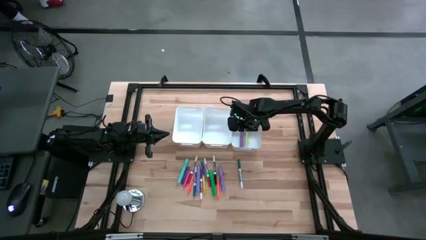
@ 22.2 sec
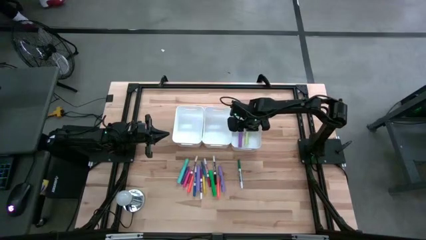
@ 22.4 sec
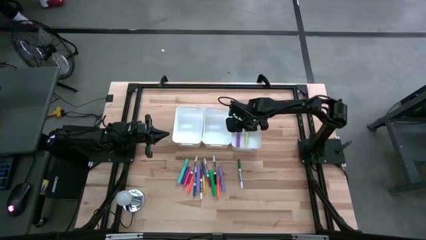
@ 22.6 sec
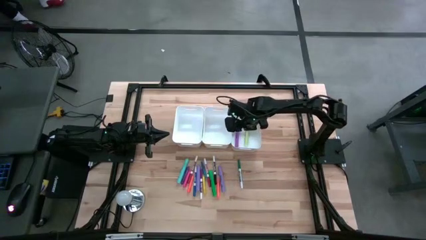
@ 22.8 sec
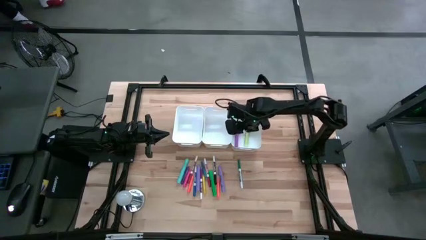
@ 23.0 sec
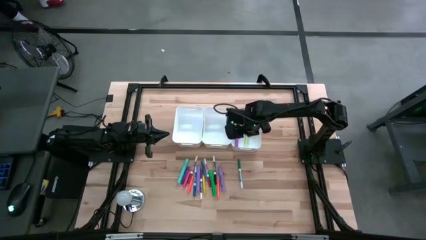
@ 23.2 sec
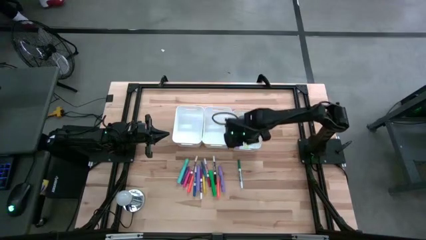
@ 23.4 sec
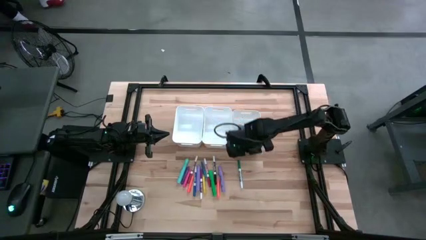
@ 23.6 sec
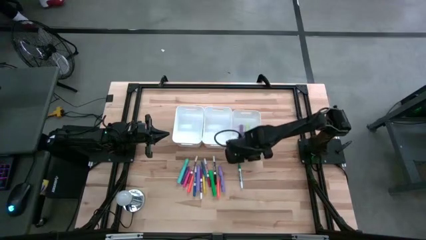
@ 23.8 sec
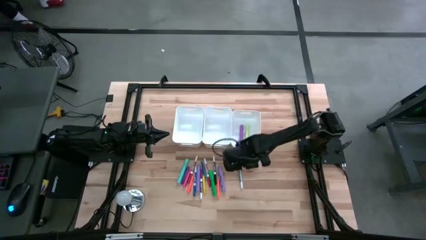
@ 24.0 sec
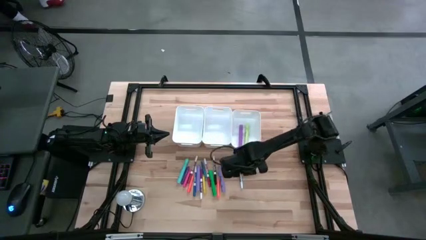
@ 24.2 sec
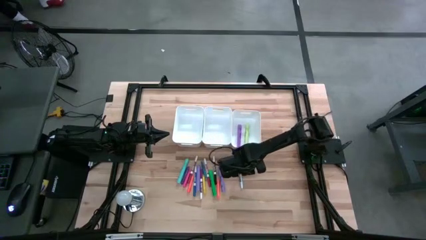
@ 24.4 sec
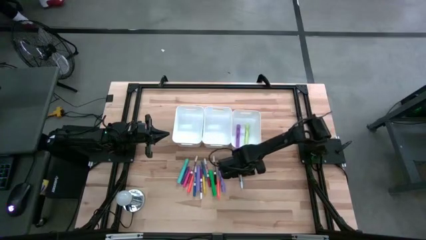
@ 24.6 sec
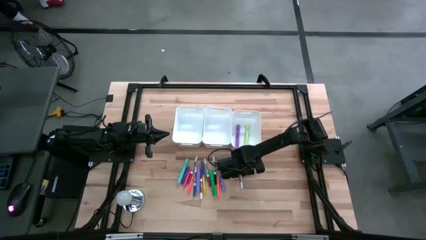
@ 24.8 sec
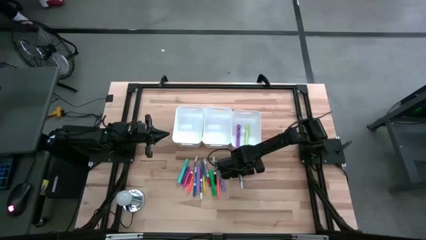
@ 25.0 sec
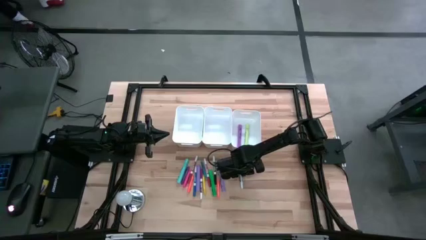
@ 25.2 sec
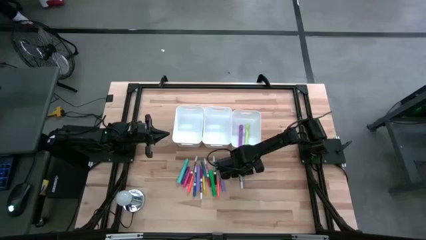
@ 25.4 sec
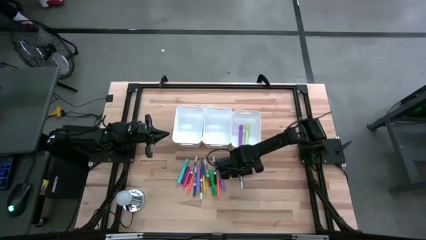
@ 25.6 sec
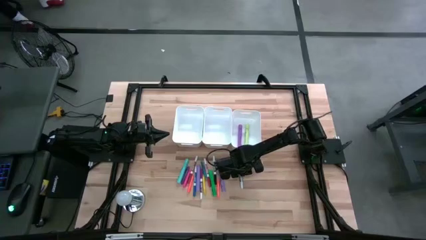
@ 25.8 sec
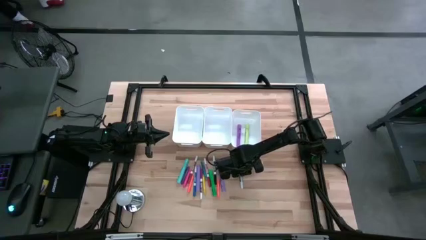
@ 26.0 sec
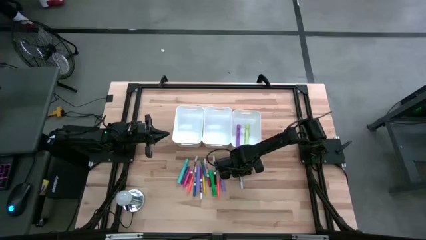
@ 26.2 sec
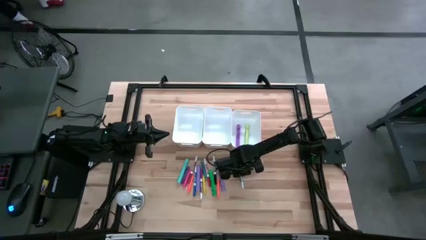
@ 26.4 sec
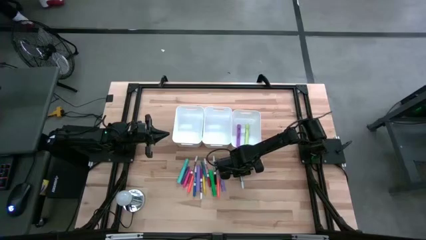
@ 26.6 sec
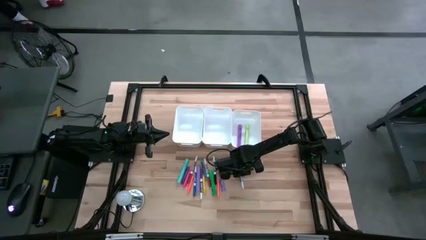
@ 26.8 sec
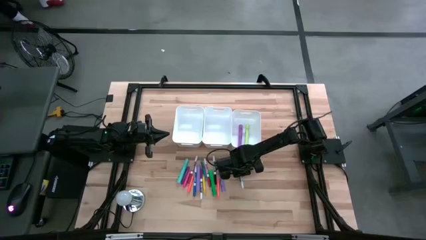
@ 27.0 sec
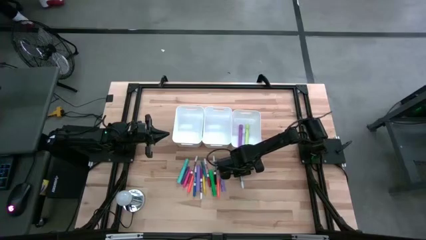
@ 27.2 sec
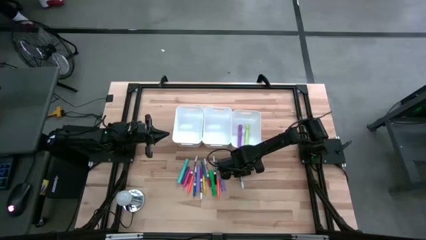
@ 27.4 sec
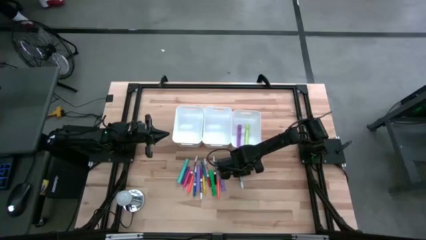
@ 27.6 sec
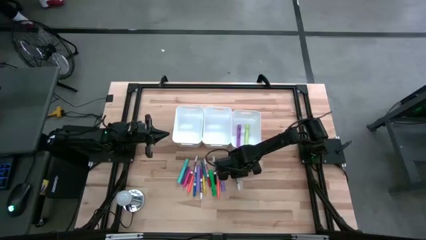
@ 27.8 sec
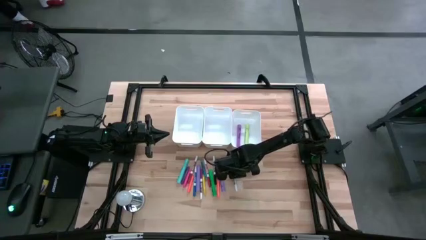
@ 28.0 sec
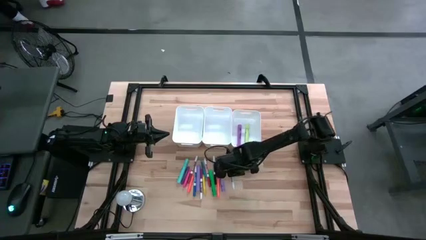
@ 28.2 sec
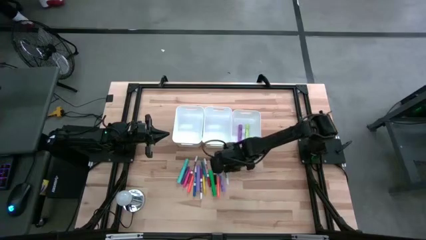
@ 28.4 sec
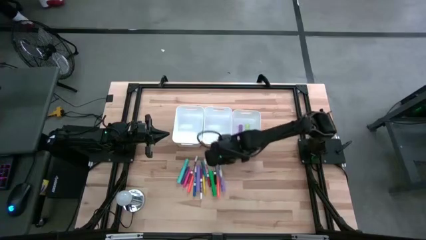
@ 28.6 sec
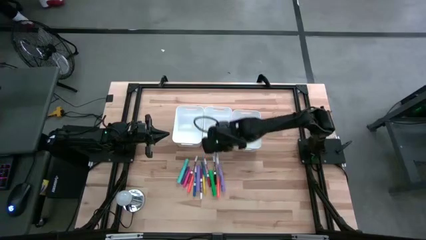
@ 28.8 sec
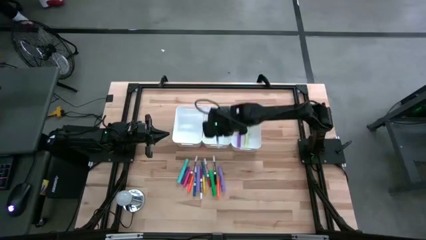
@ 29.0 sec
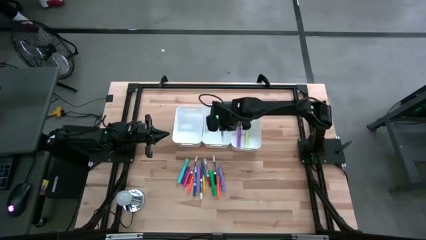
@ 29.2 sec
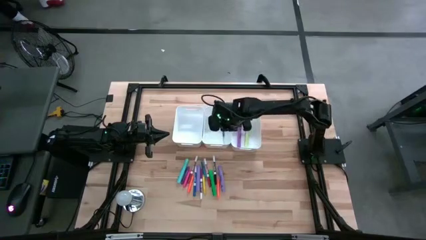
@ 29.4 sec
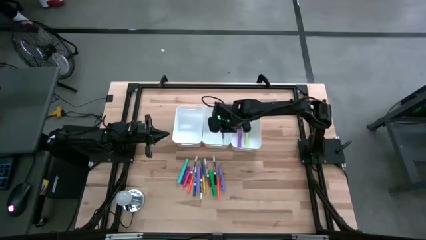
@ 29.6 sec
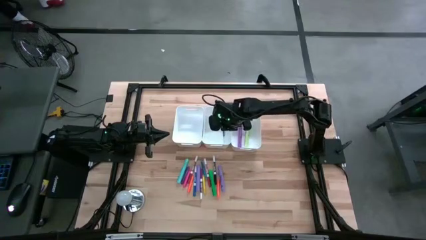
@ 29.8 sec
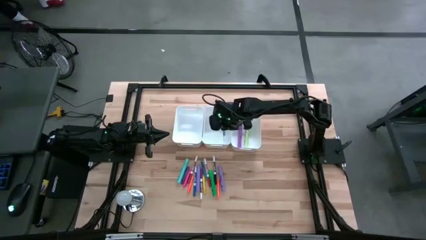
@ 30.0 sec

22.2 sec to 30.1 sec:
Task: Pick & Place Markers
Put the green marker into the middle white bin

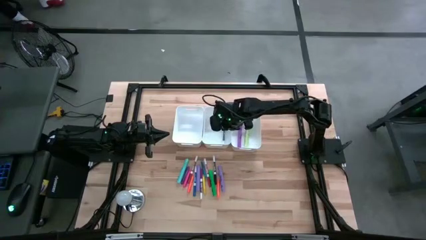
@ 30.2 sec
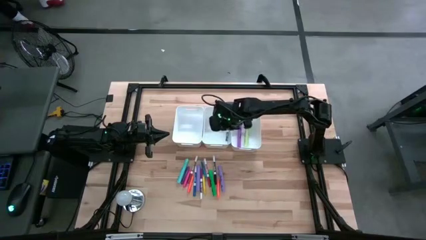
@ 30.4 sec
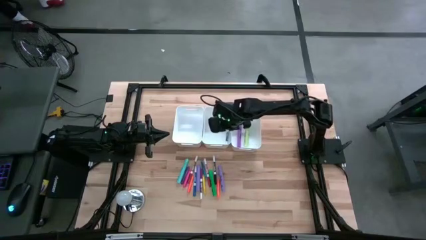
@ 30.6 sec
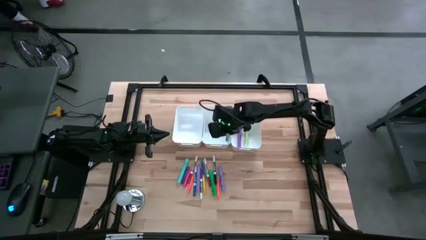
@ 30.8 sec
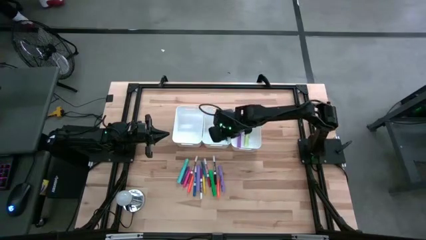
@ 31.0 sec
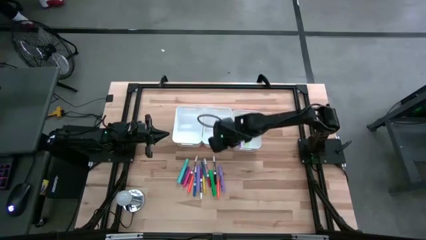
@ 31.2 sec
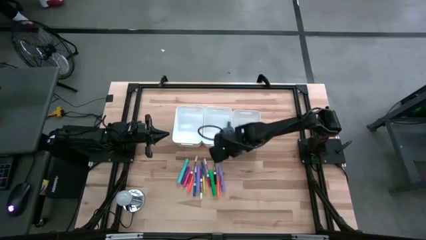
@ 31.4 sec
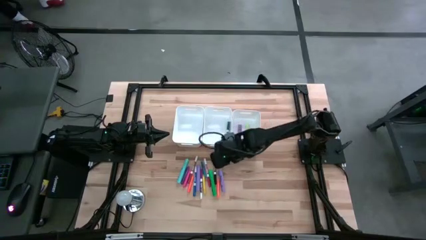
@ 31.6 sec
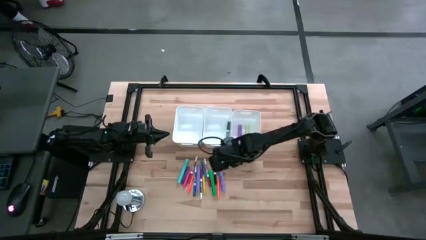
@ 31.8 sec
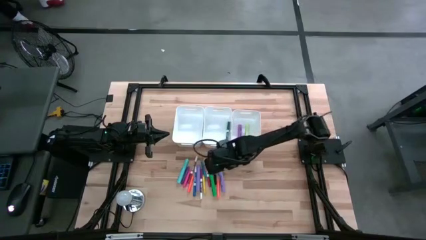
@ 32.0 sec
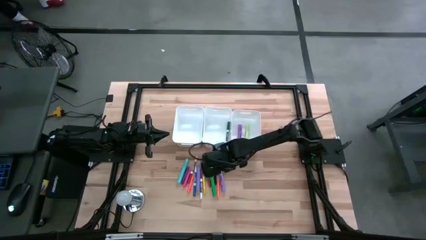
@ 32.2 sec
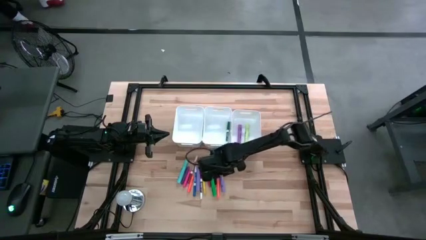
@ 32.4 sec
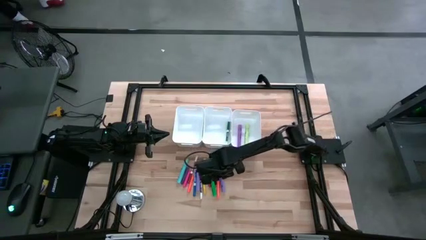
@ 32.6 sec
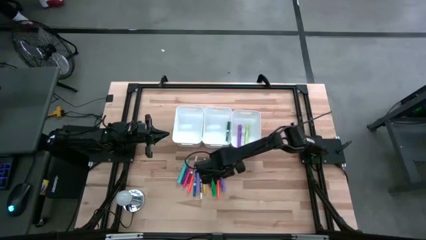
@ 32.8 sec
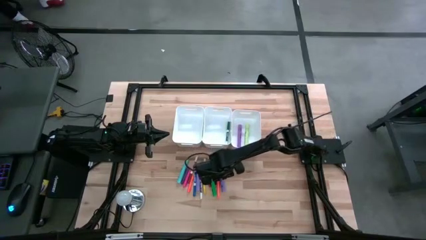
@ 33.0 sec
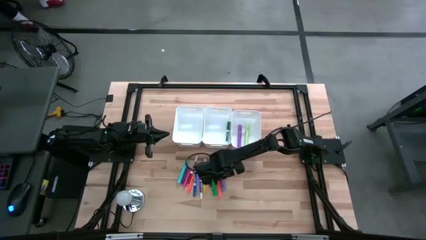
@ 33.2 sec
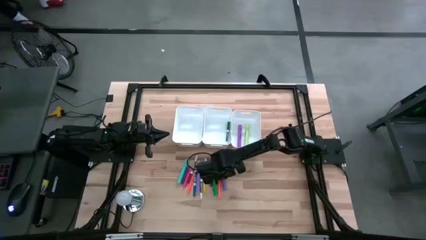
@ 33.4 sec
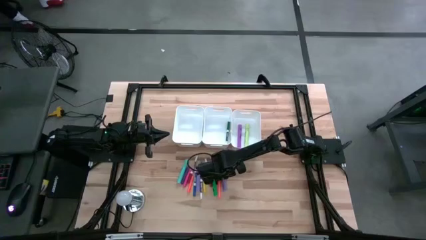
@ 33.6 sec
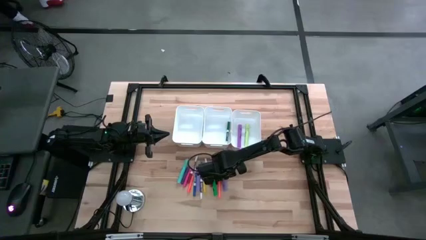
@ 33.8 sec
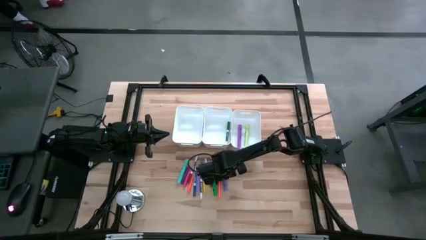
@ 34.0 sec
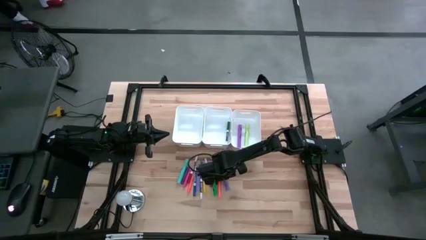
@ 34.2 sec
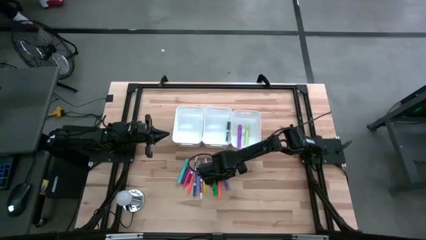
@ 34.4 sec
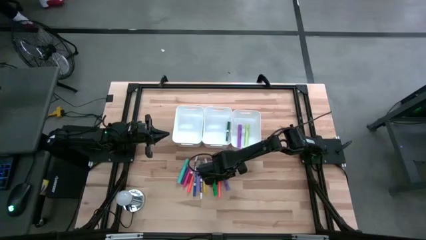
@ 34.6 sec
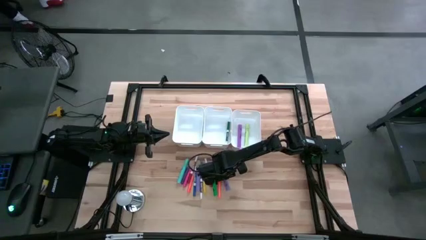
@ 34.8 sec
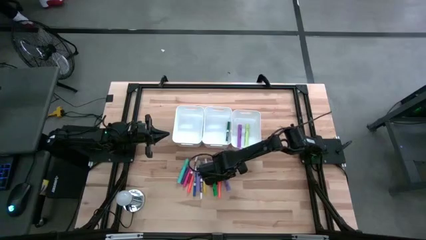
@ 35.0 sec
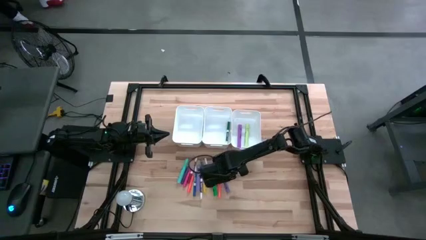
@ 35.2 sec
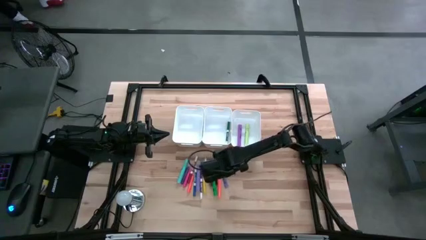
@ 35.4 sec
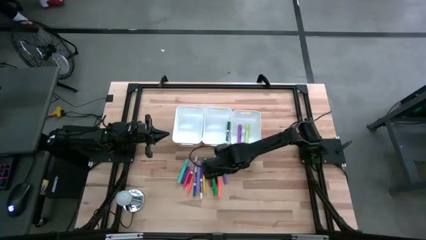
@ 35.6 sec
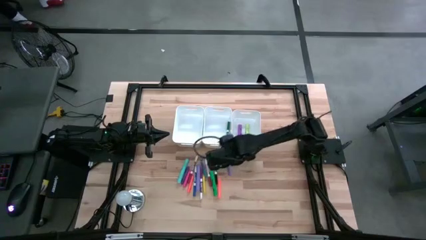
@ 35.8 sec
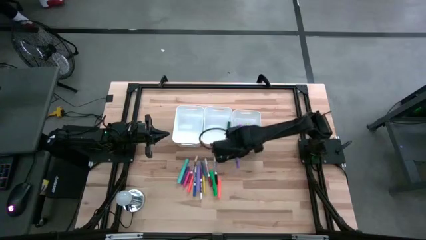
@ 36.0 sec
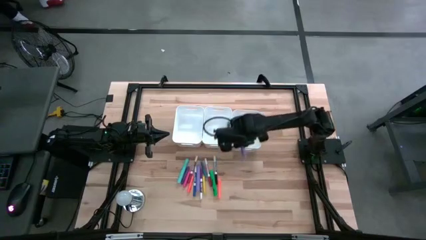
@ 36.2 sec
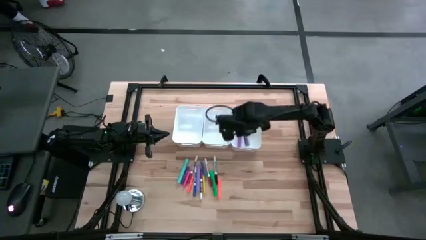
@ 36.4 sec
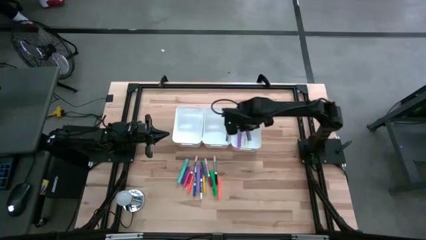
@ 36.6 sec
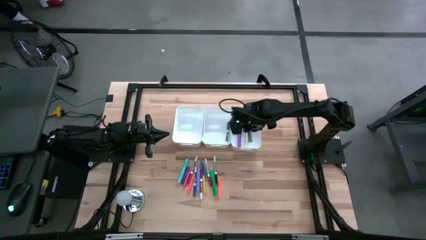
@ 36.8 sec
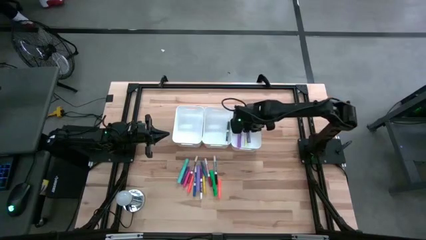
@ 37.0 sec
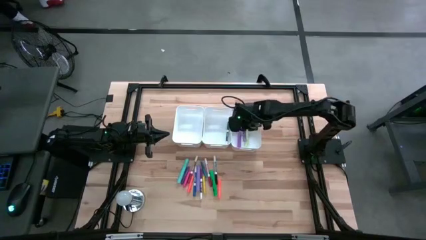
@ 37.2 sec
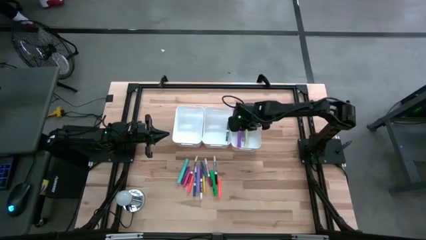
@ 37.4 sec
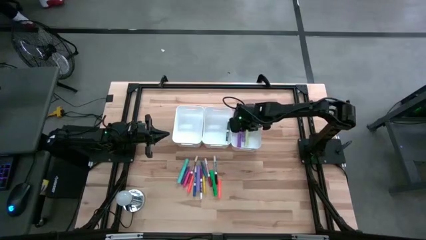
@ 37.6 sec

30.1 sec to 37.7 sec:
Put the right violet highlighter into the right white bin
